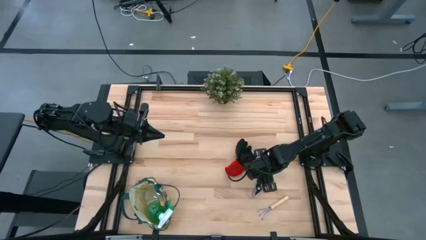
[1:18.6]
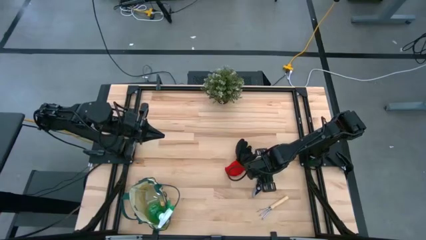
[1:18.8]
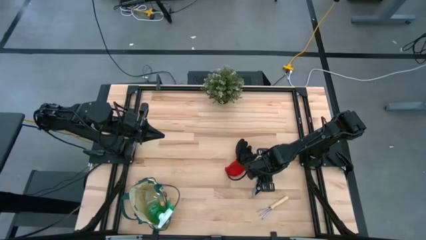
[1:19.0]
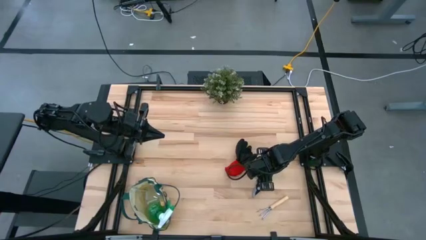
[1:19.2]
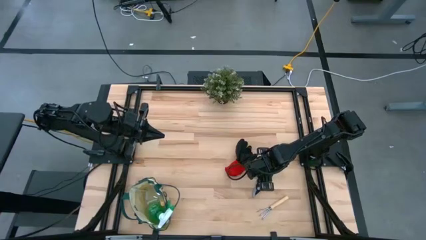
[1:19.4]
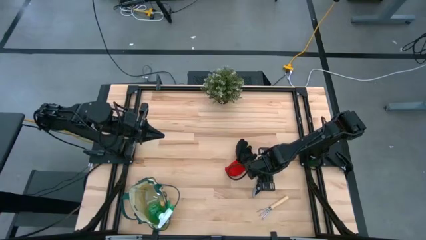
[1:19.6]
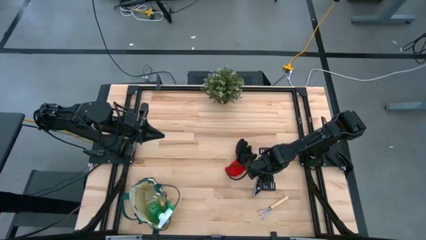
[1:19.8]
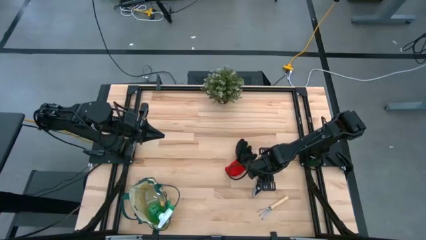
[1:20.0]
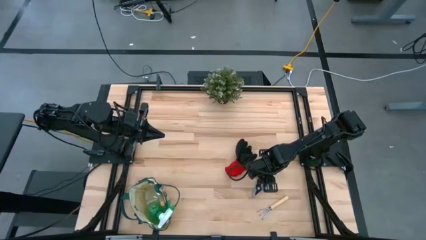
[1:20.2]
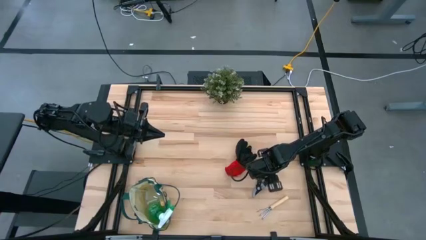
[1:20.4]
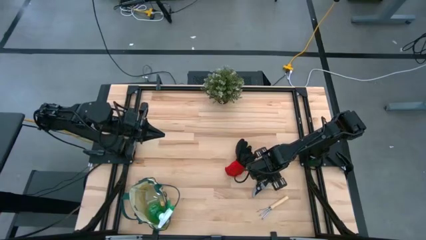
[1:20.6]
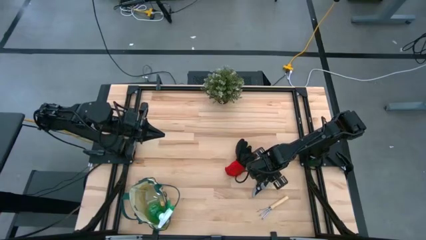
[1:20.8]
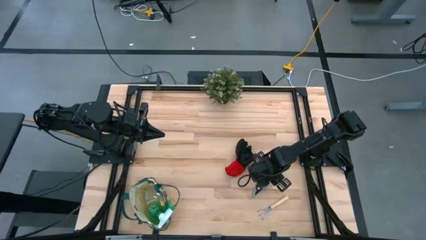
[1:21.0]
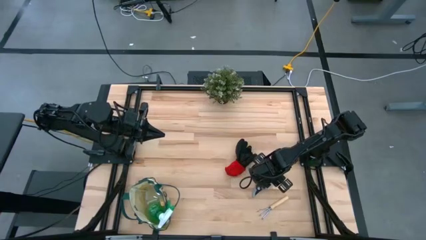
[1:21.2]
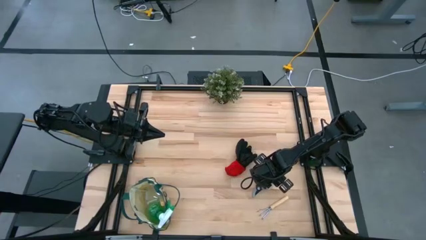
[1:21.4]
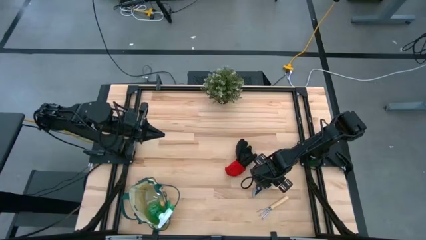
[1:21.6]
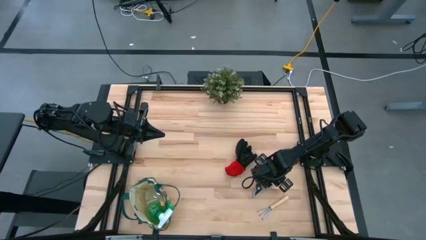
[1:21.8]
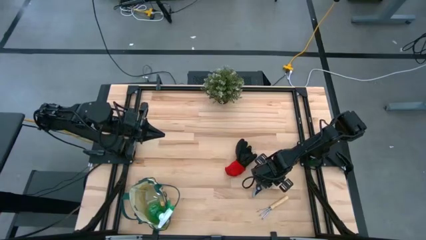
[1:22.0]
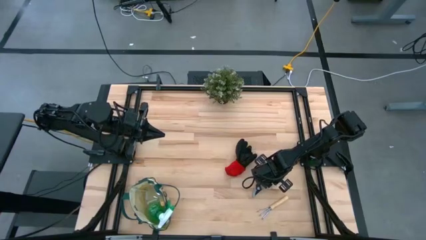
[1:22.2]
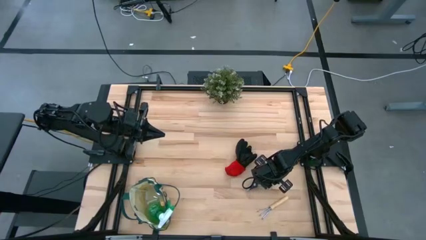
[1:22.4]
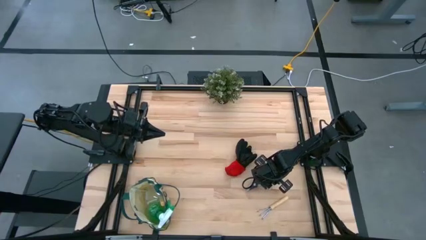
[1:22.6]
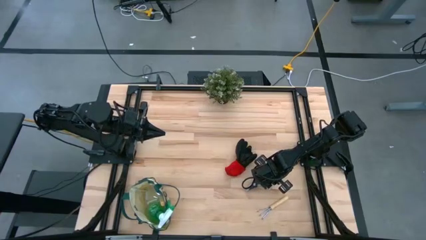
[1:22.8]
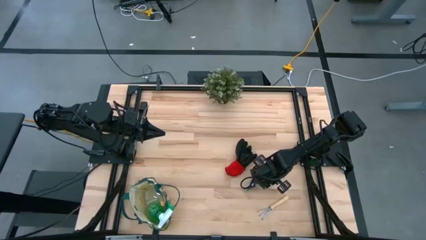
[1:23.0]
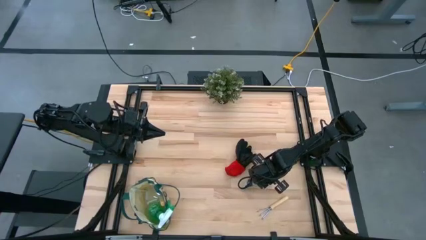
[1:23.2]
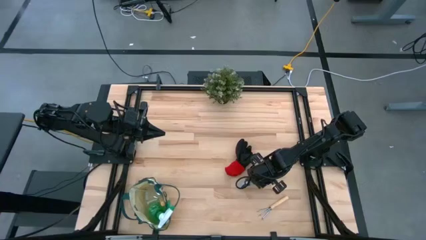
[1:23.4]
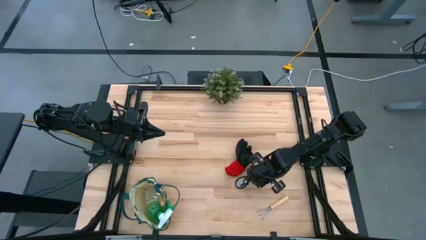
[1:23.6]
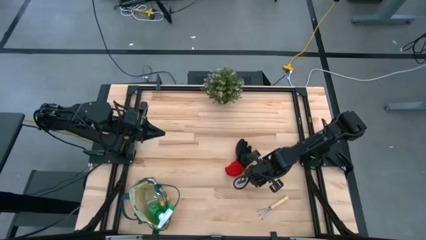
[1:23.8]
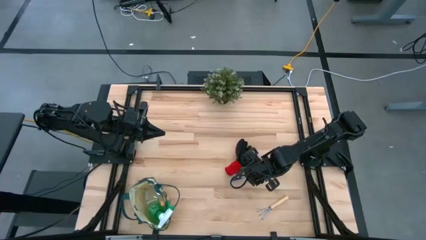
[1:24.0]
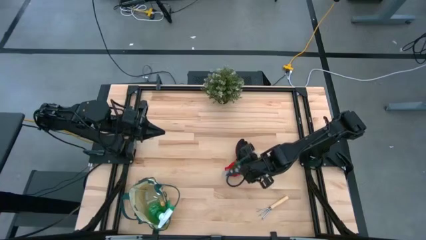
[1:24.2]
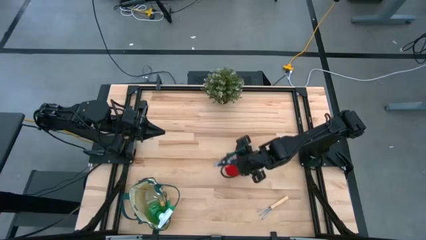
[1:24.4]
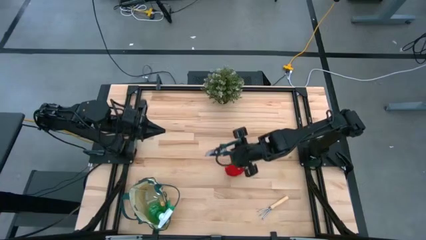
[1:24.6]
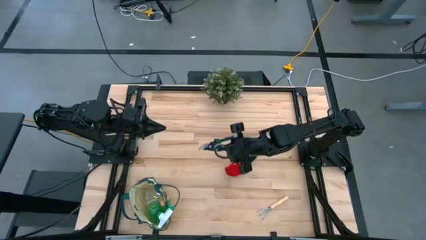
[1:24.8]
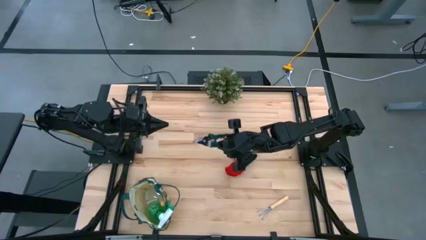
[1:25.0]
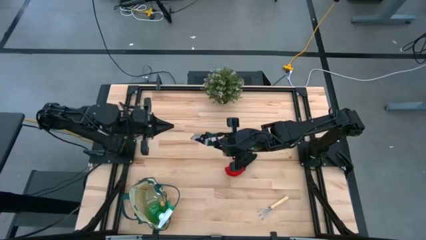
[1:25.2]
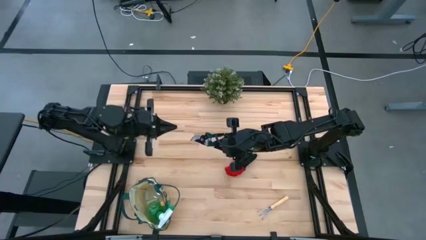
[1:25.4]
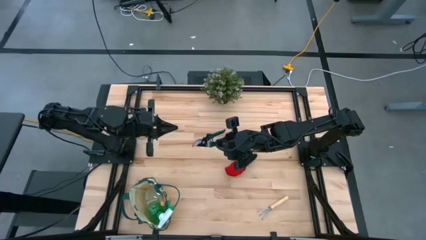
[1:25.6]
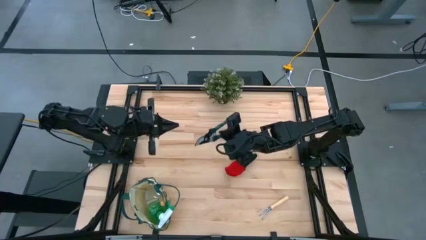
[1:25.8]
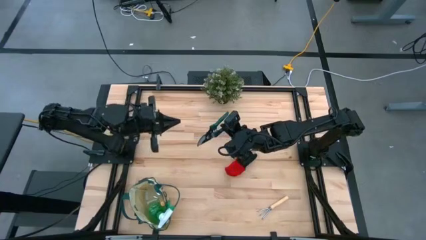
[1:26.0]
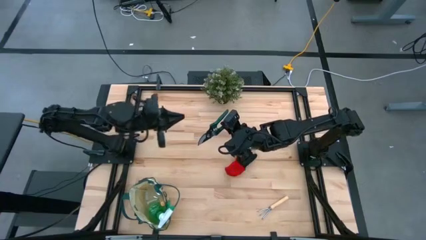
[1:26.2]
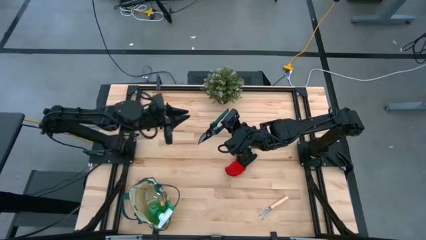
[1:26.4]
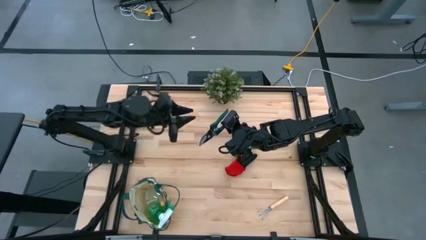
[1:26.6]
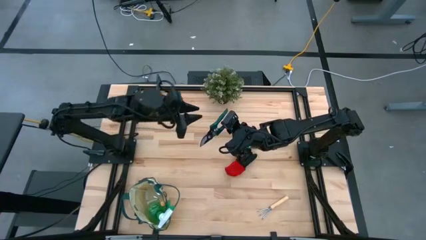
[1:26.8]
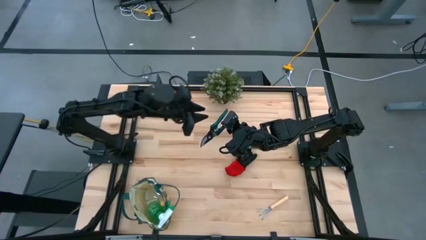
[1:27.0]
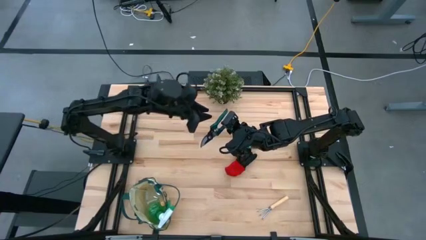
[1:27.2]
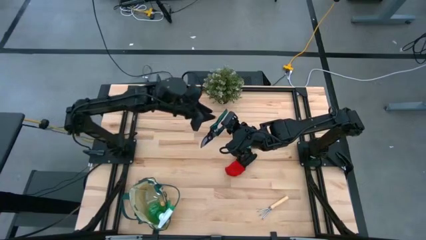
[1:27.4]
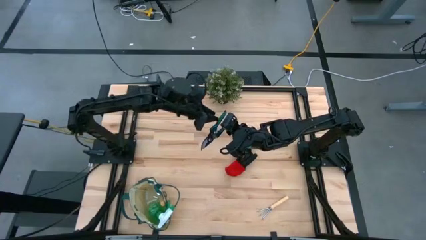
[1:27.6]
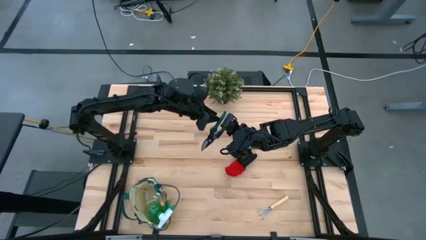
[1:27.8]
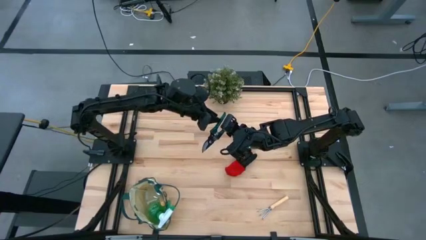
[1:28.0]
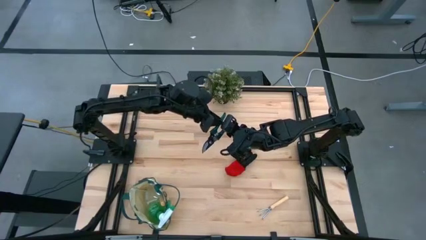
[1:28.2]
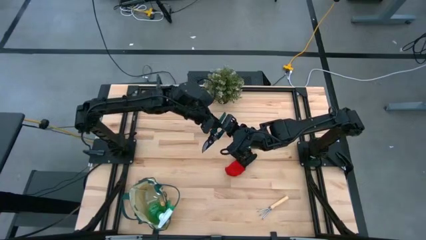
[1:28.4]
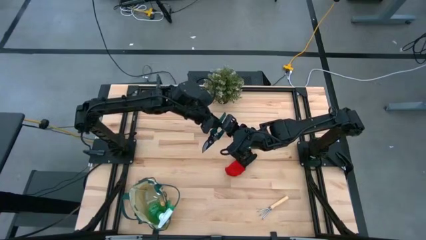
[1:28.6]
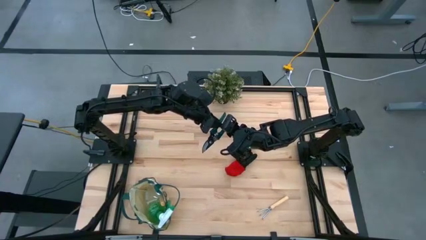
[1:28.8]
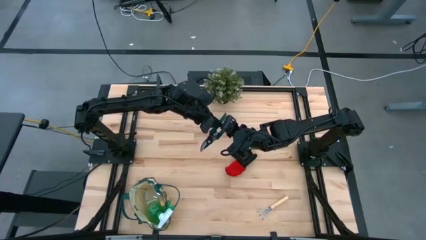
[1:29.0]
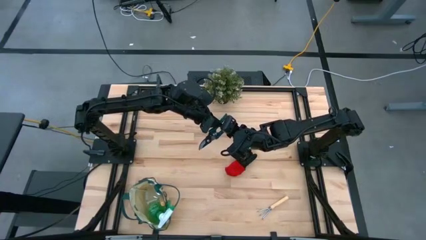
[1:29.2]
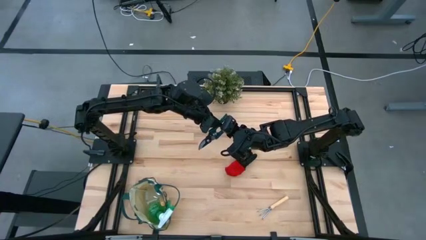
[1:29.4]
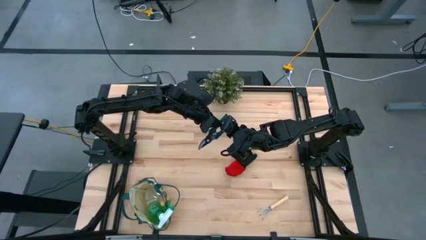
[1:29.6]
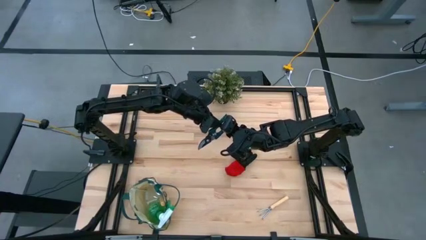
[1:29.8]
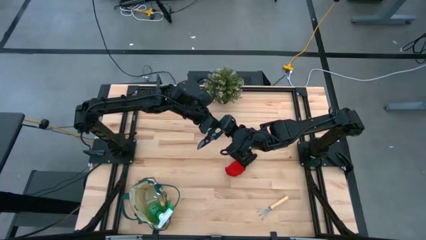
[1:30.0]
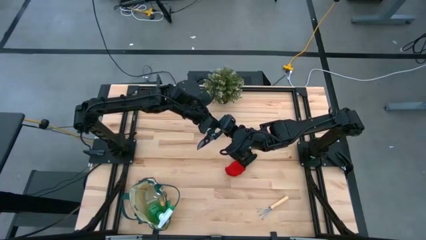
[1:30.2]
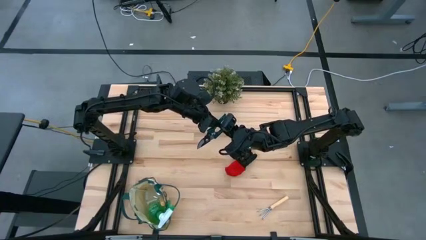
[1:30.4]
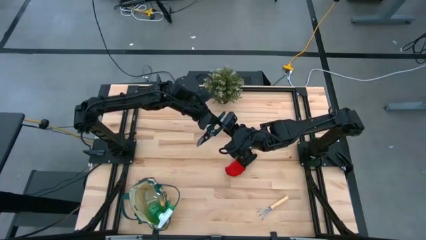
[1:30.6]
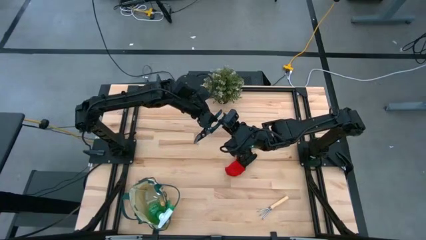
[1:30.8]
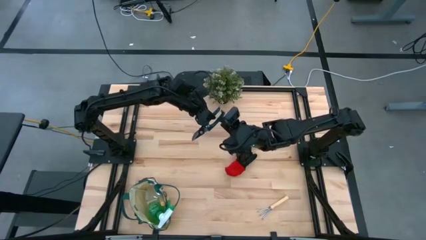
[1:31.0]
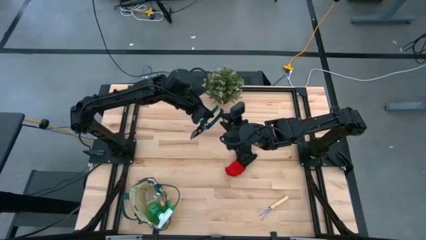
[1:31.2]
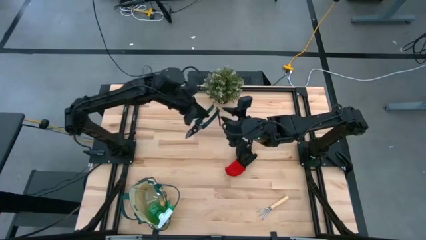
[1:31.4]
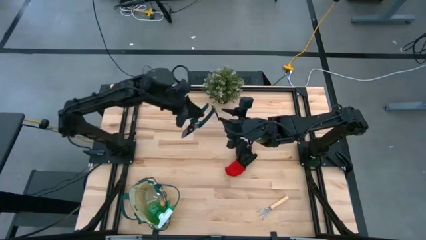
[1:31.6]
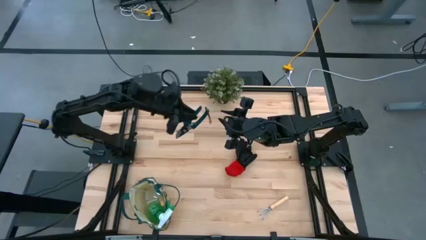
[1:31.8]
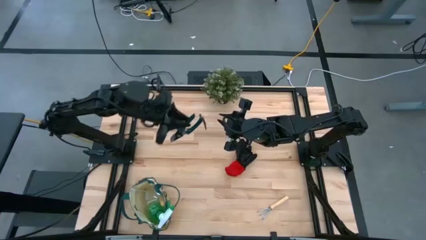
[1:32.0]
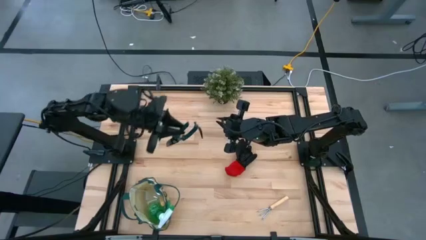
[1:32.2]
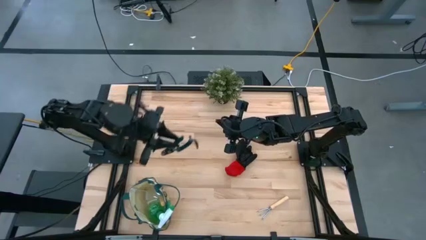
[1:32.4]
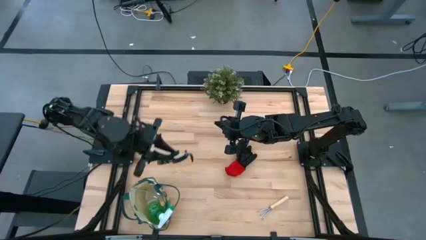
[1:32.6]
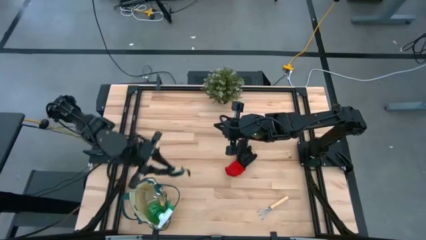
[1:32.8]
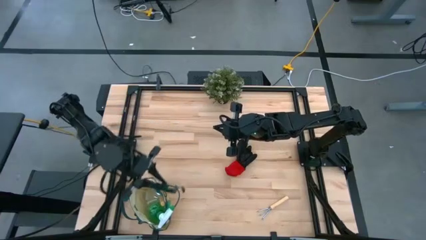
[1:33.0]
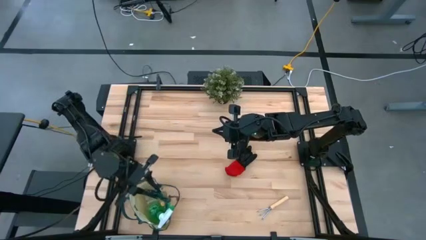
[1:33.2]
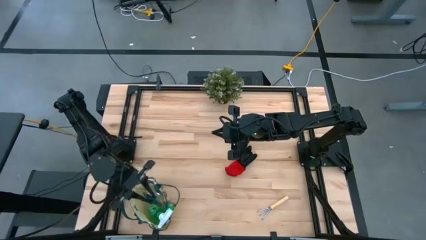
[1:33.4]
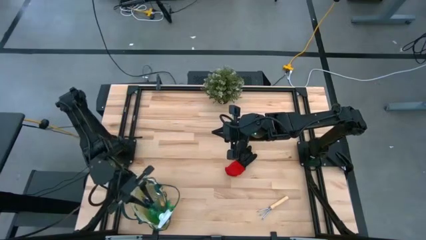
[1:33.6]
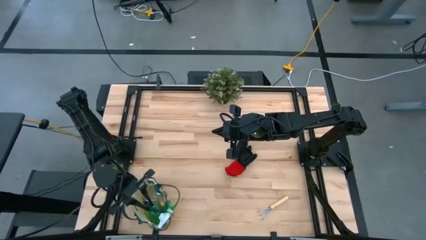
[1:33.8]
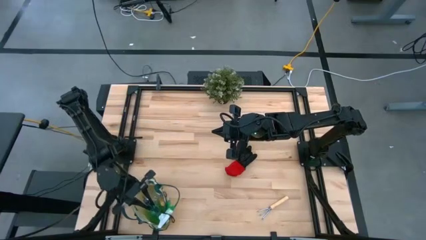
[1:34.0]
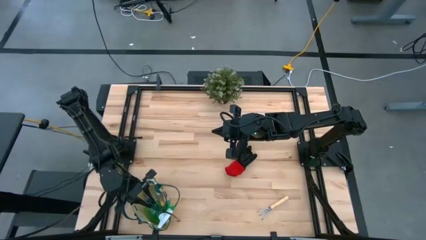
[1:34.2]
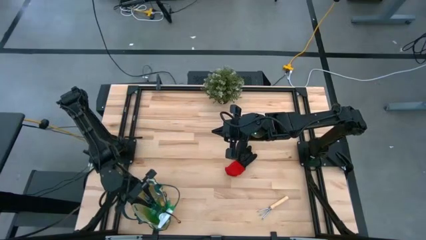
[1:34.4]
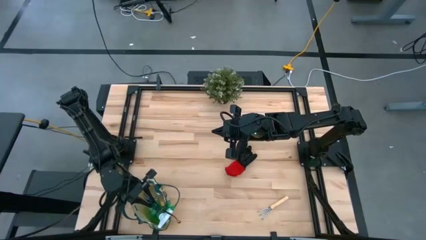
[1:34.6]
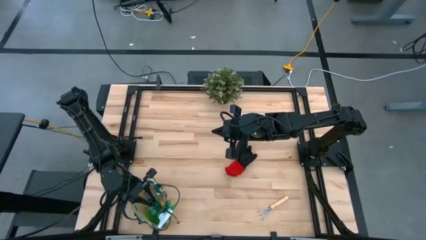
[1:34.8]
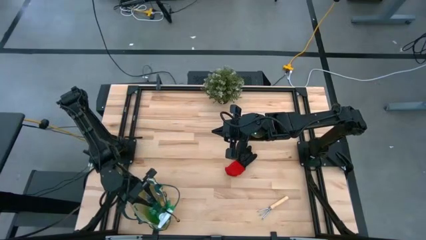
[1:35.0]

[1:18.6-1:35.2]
Task: Pick & Place Garden tools in Gardening bag
Put the green shear scissors into the gardening bag
